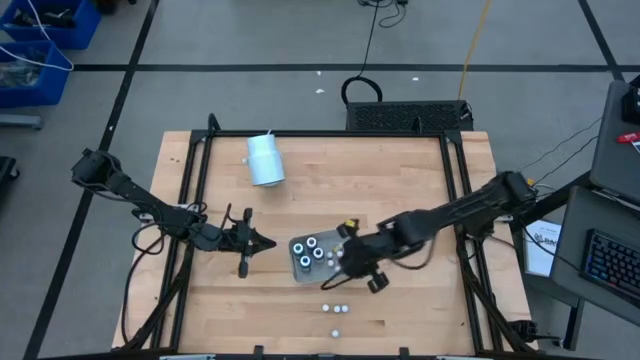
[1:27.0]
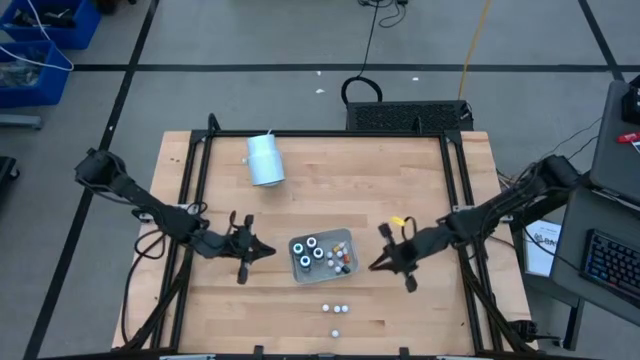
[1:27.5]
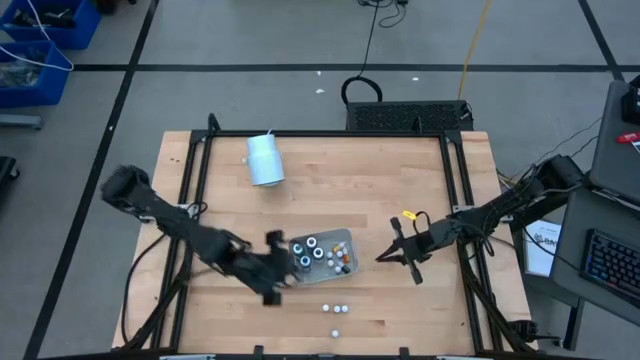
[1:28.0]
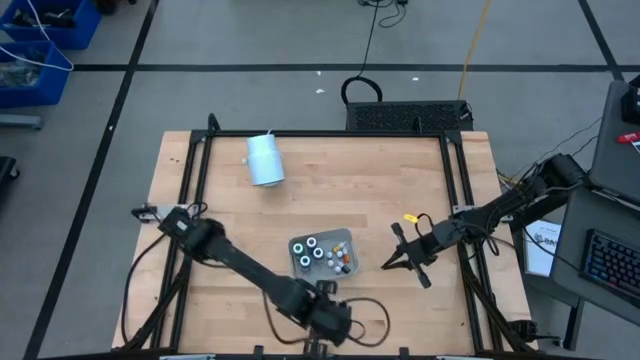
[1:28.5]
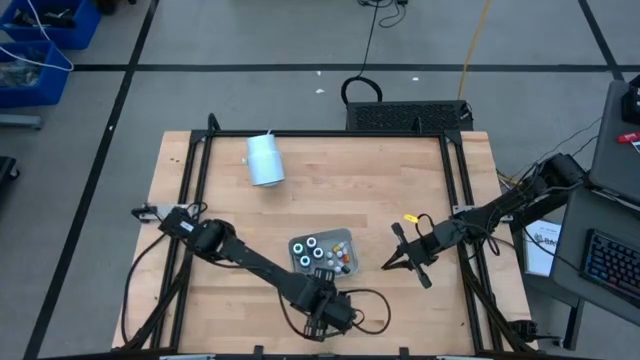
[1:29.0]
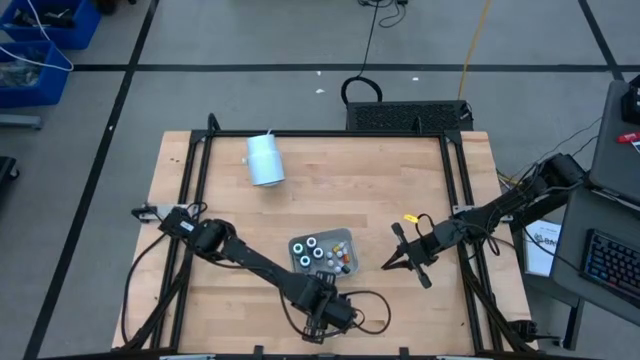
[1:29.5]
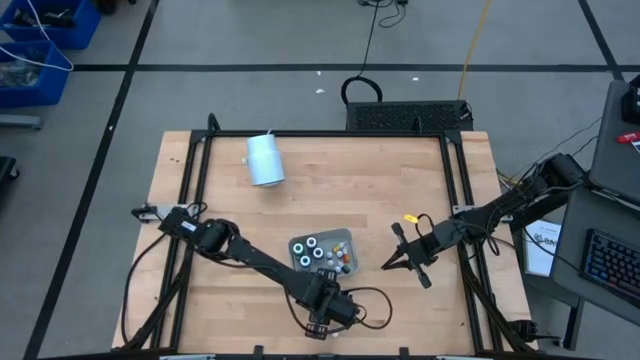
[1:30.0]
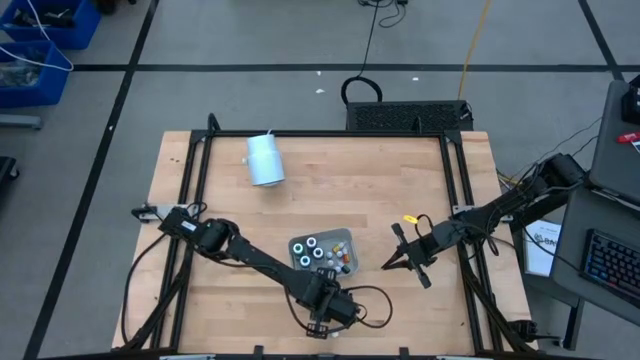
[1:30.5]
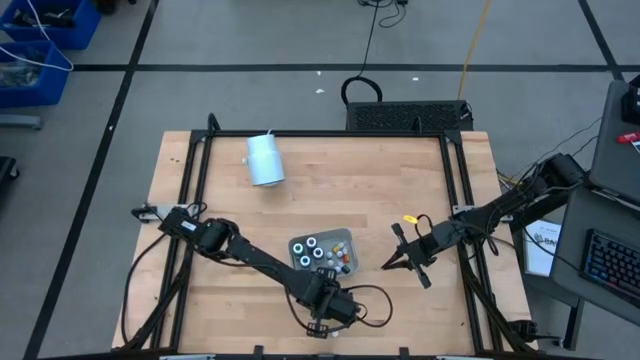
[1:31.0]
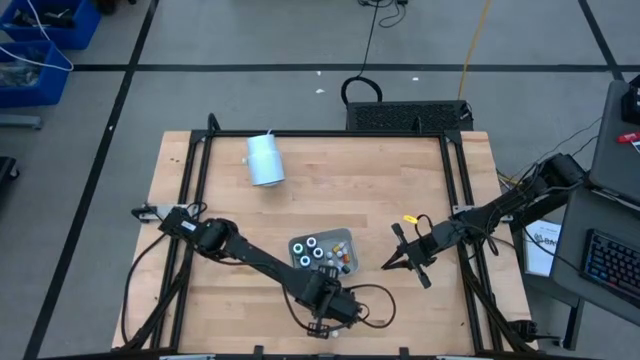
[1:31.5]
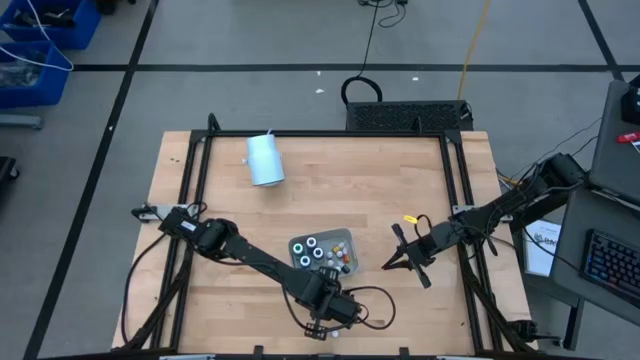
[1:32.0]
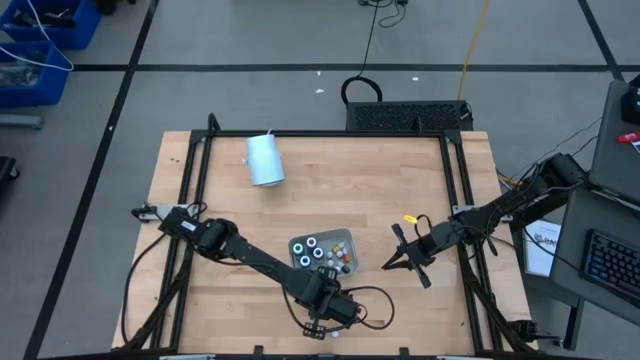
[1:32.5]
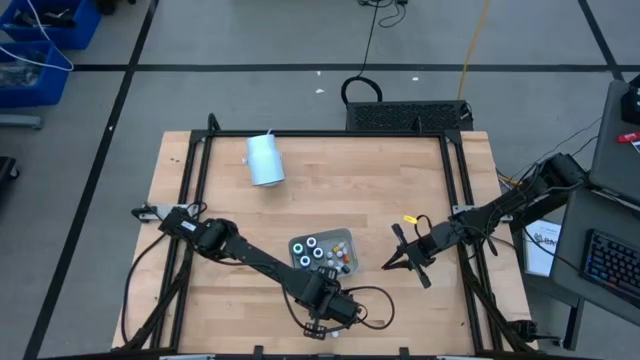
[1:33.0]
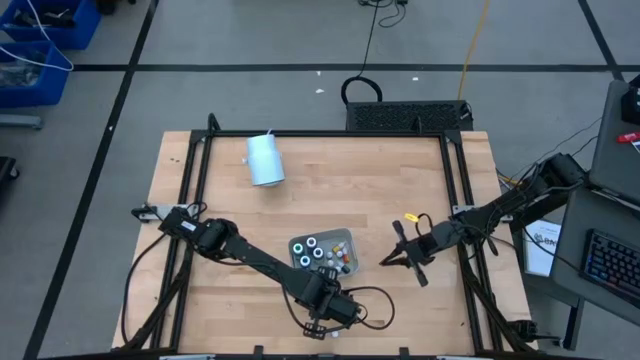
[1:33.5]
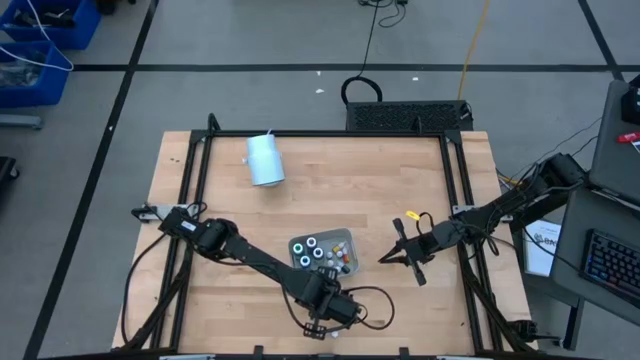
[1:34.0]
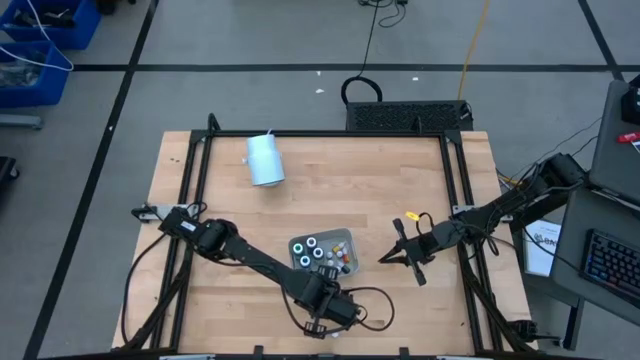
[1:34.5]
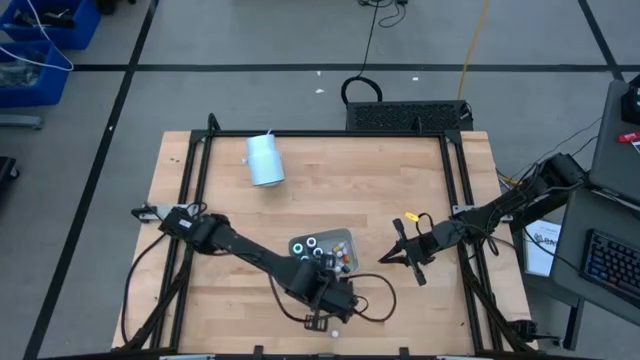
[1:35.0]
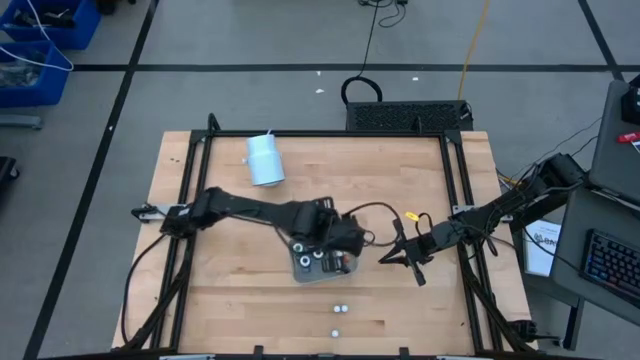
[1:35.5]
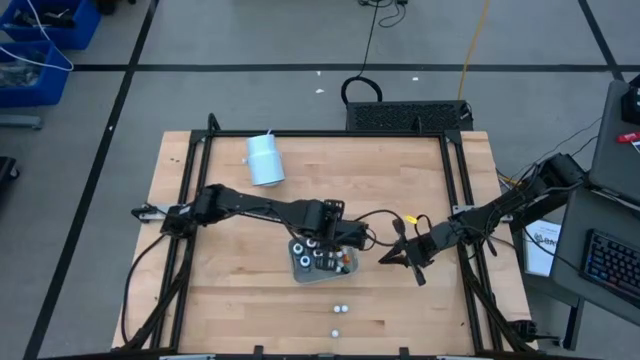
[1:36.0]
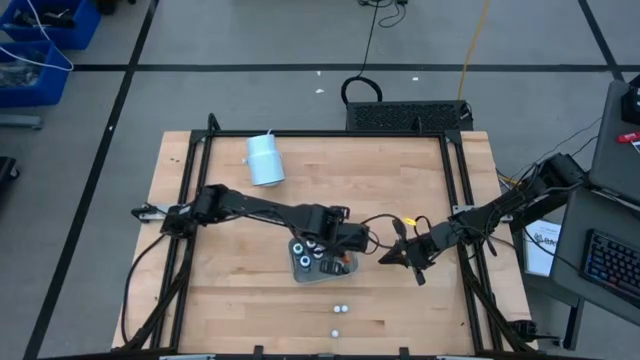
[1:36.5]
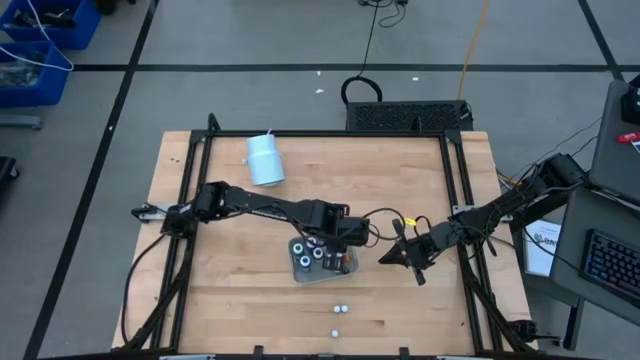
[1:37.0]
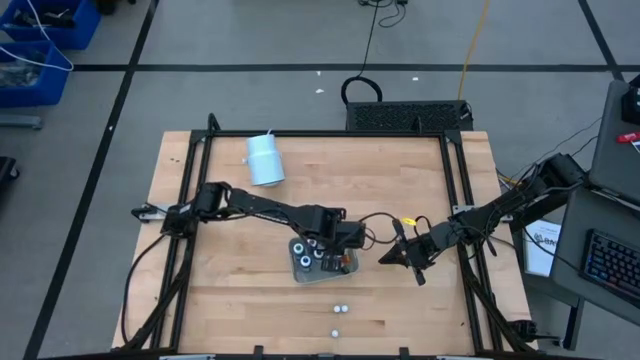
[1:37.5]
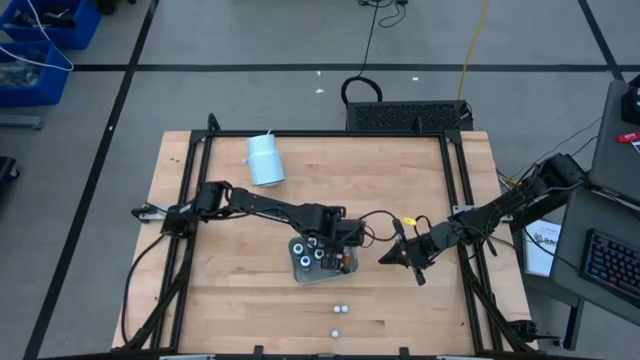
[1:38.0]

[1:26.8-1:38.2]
Task: Pick & Place food coloring
Put the small orange food coloring bottle into the gray bin

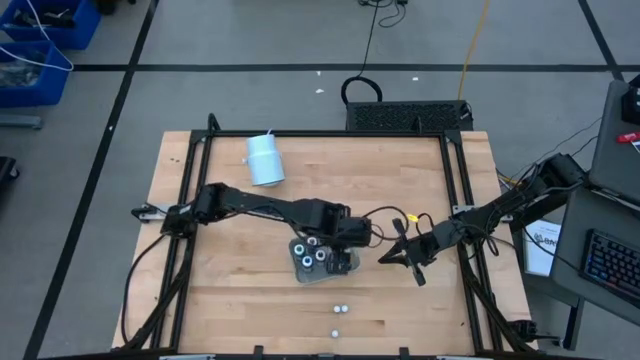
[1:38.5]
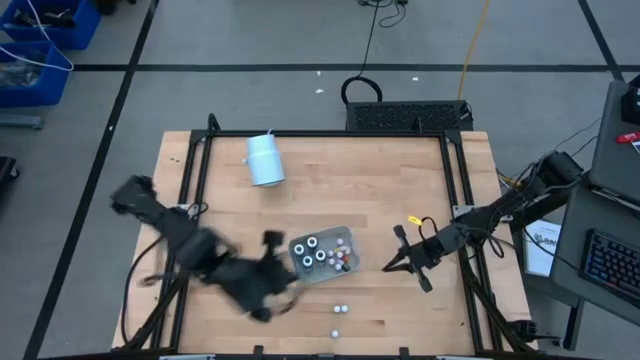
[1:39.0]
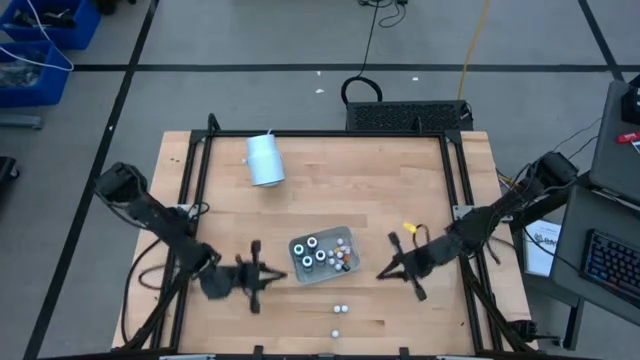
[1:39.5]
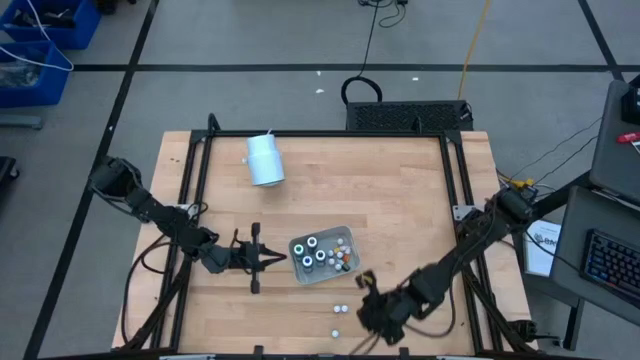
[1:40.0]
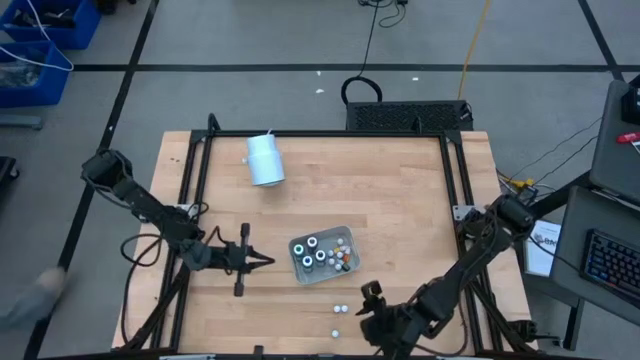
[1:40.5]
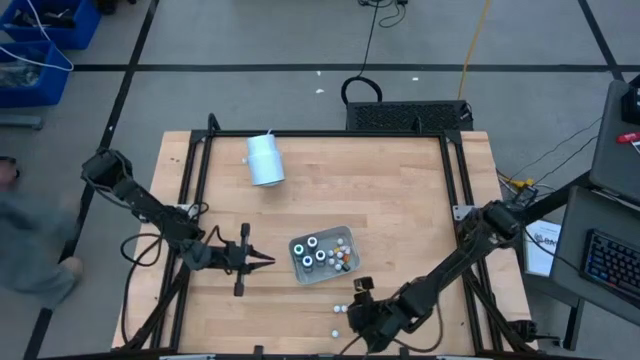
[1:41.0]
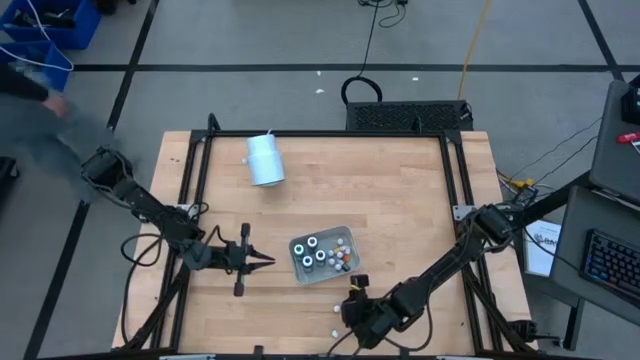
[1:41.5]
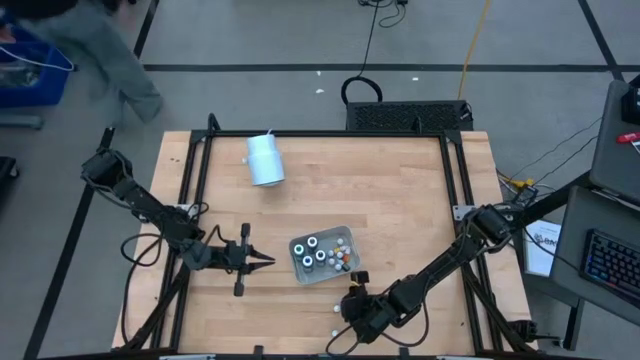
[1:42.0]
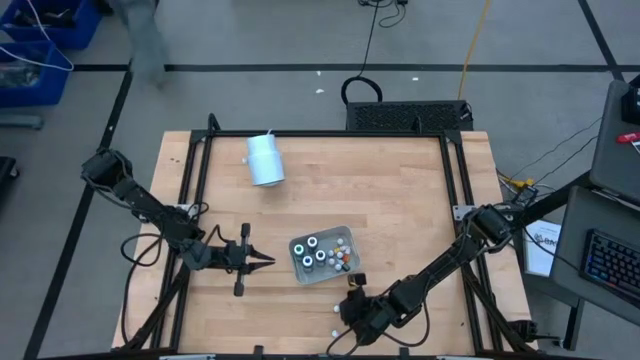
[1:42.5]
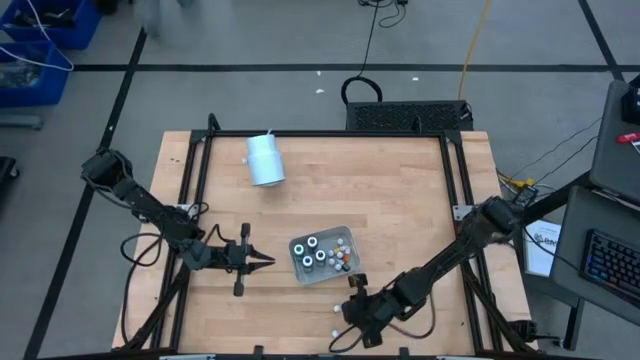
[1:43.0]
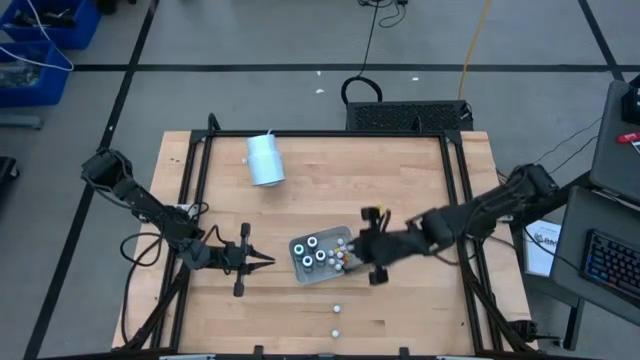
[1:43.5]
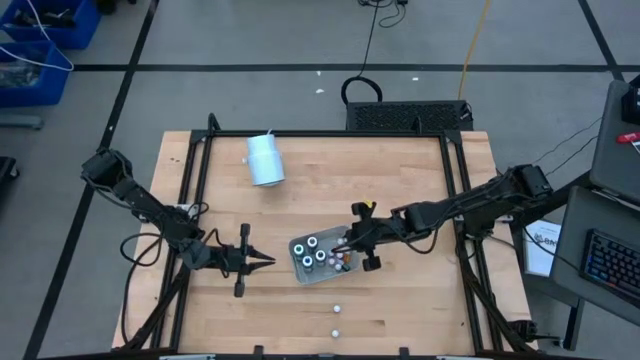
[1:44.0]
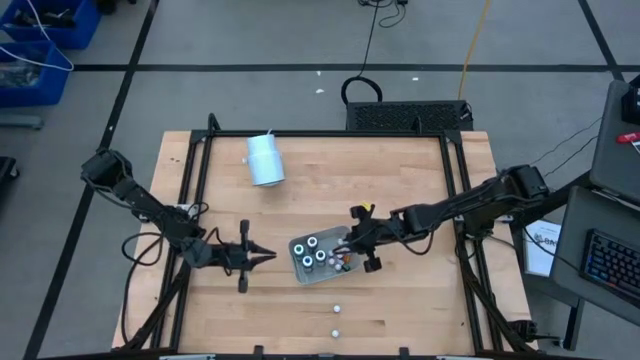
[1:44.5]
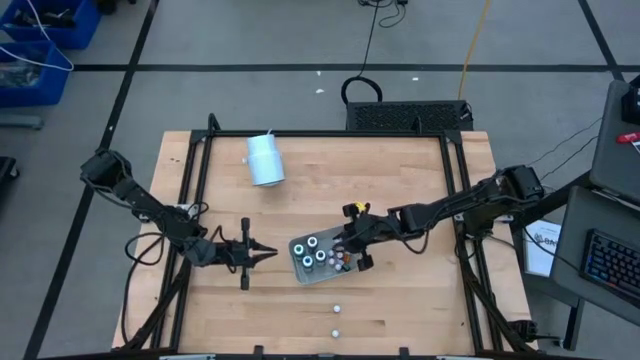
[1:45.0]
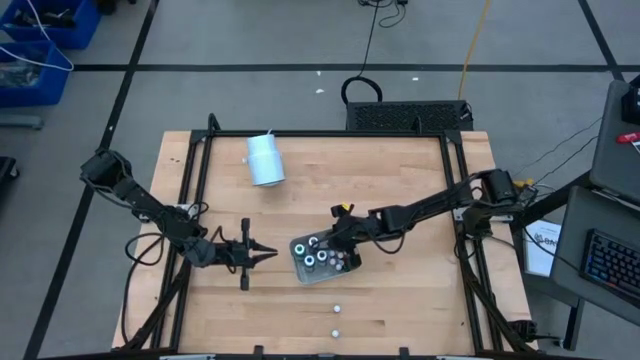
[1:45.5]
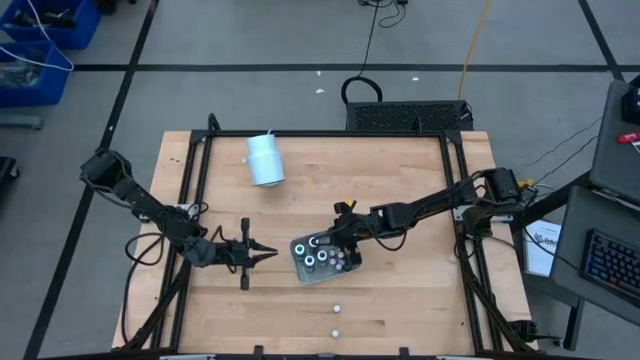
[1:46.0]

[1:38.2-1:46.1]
Put the small green food coloring bottle into the gray bin

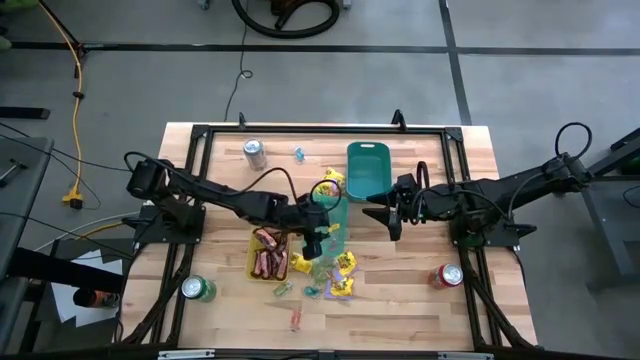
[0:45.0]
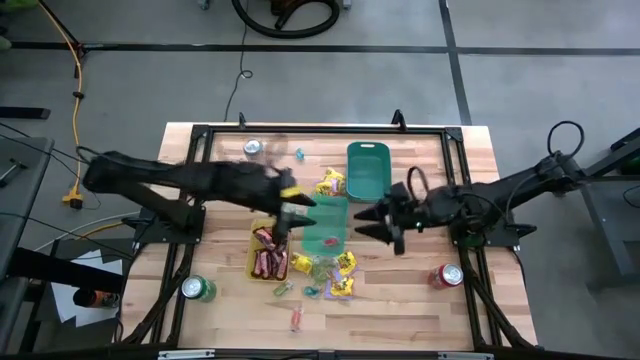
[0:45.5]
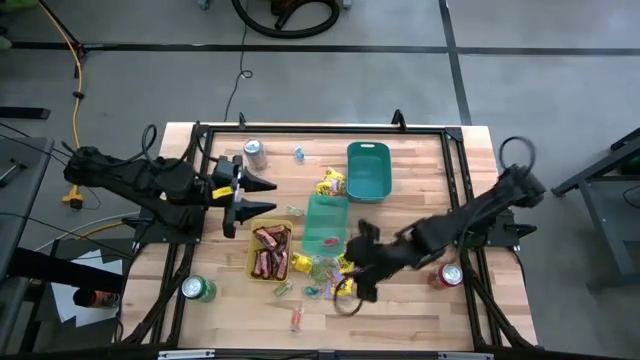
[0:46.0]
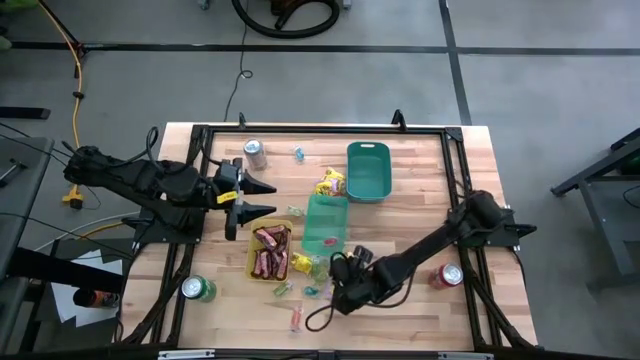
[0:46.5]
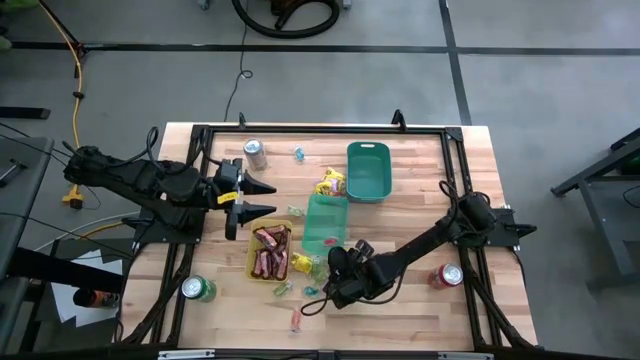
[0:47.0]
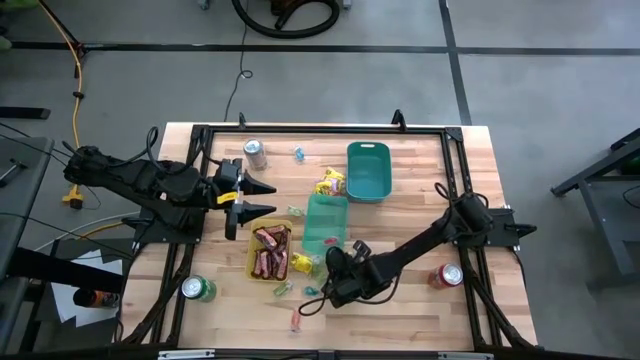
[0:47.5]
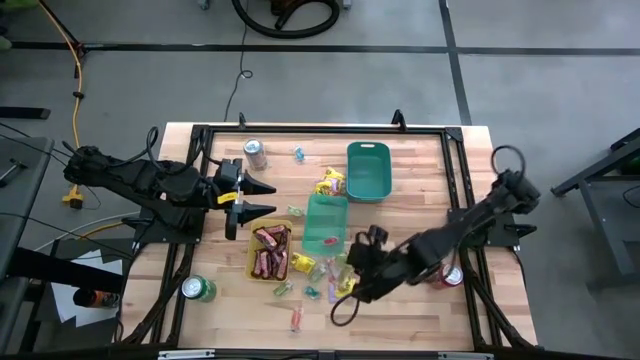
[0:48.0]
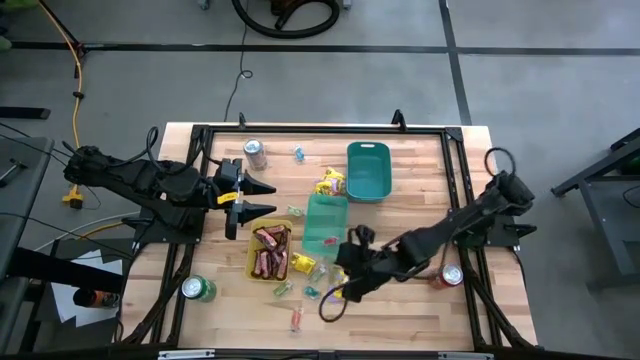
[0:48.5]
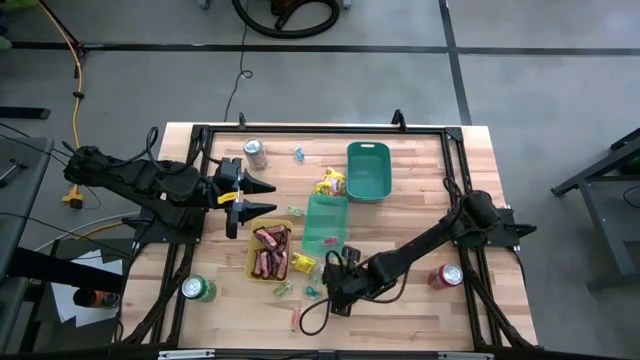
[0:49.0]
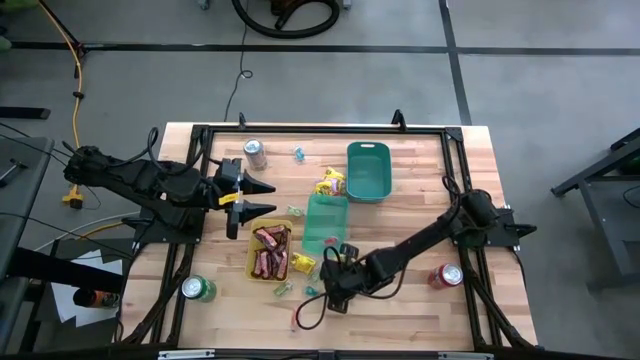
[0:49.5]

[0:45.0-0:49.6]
Task: Sort candy
Put the green gummy into the light blue bin
